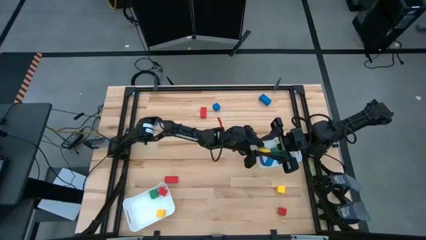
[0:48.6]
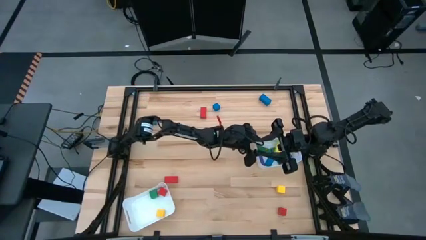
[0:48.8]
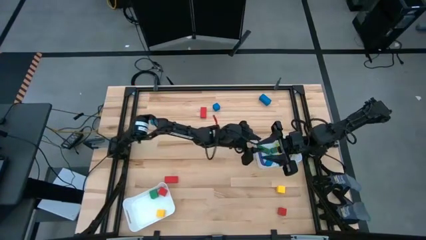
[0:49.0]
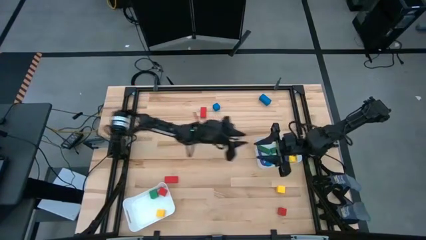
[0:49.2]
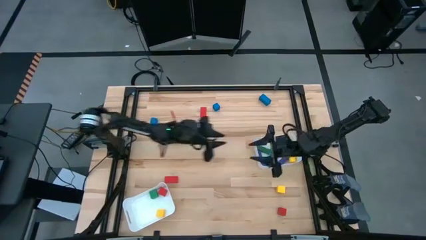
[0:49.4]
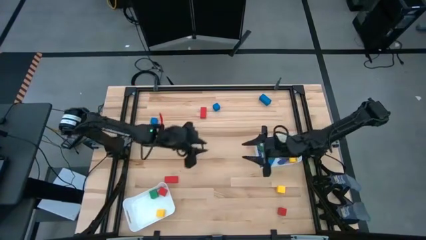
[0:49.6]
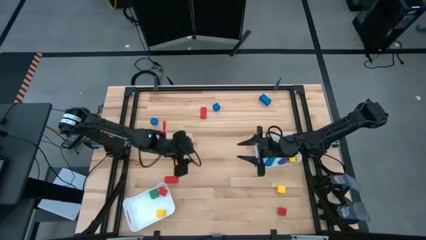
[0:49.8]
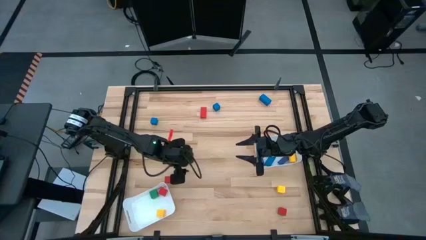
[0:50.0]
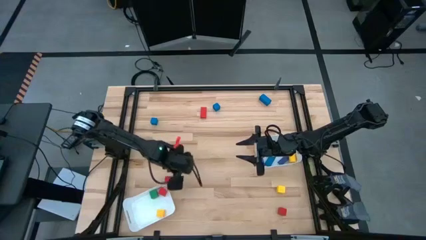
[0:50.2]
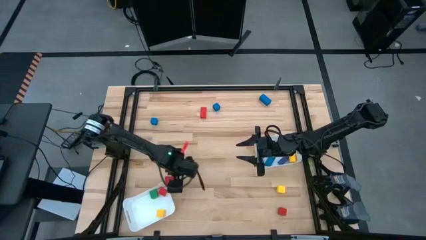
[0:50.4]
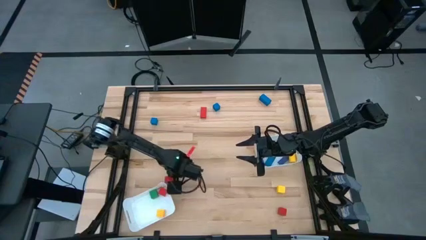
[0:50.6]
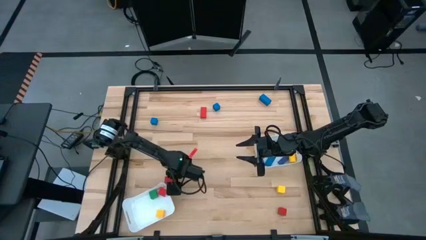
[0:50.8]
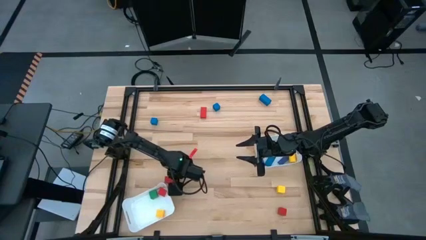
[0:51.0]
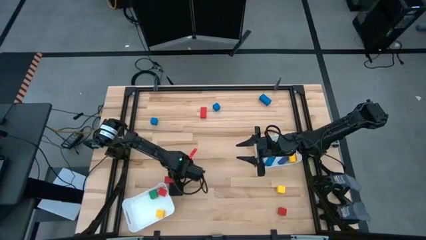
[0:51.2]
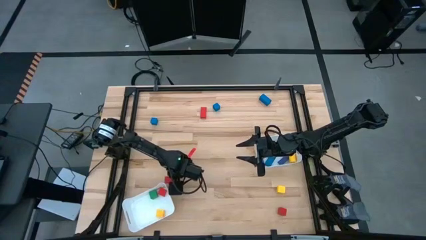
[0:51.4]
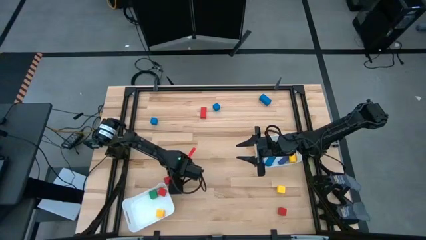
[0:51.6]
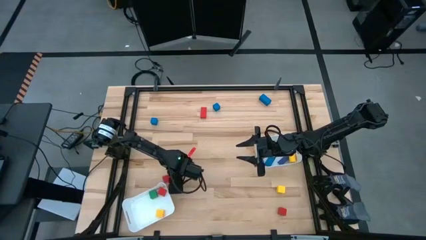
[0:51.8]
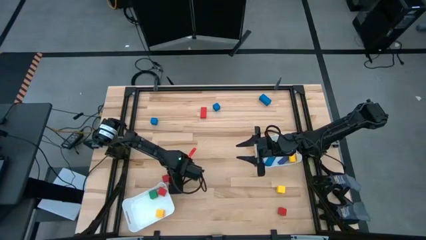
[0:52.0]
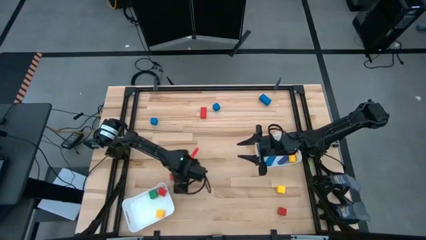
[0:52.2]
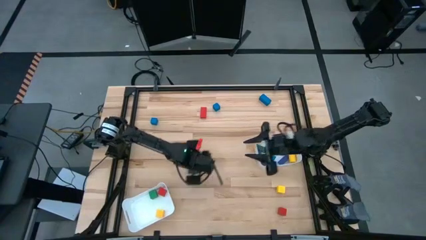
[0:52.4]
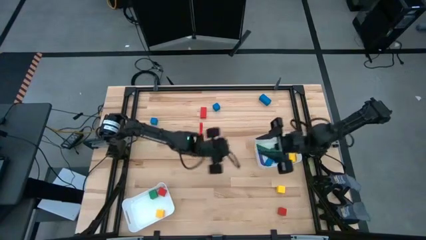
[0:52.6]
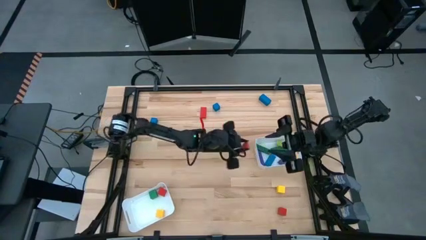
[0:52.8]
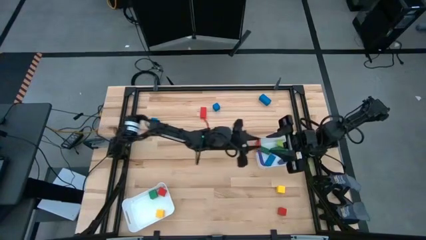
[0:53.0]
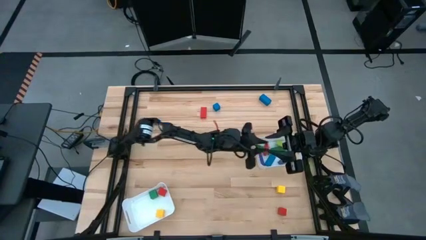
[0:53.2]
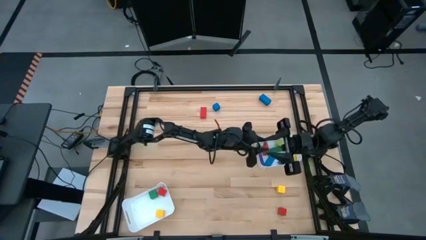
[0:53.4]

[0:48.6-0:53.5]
Task: Sort blocks by size
Put the red rectangular block into the top white bin

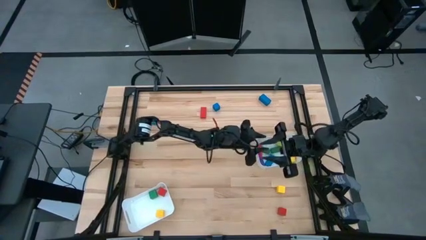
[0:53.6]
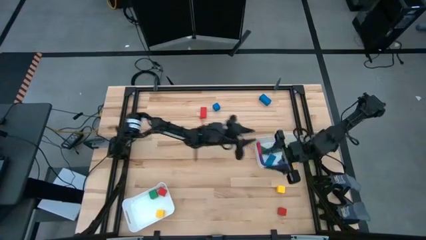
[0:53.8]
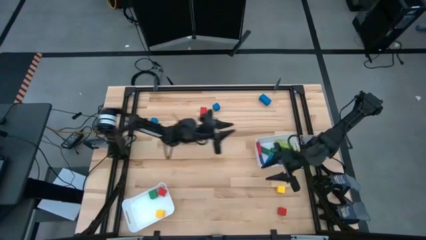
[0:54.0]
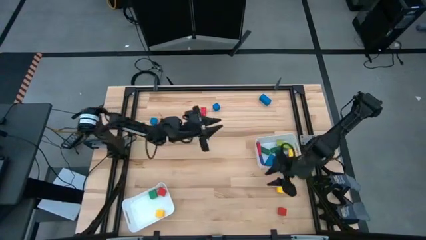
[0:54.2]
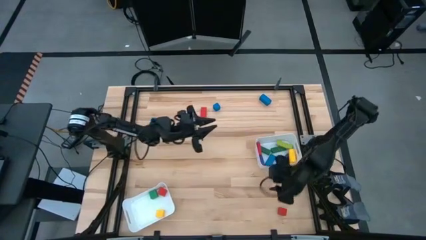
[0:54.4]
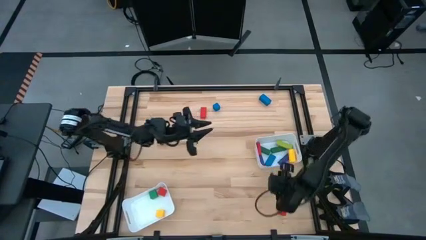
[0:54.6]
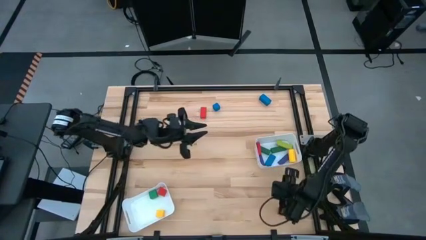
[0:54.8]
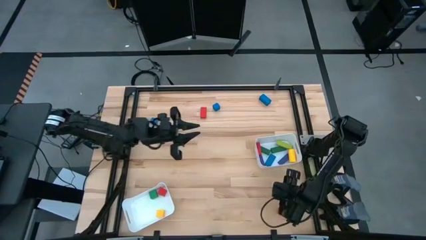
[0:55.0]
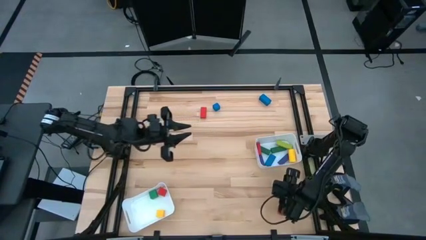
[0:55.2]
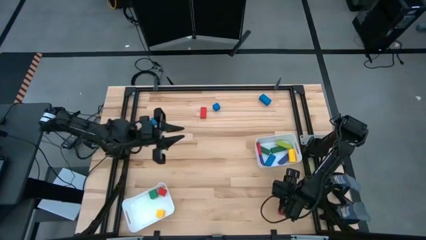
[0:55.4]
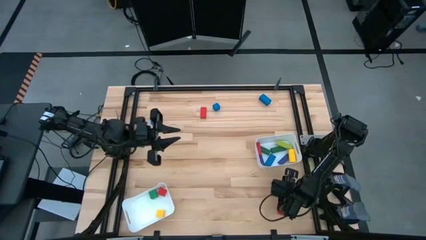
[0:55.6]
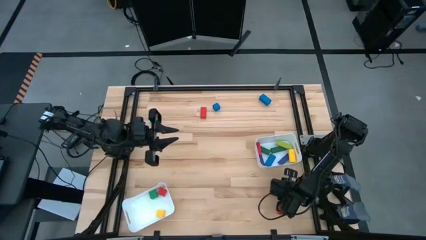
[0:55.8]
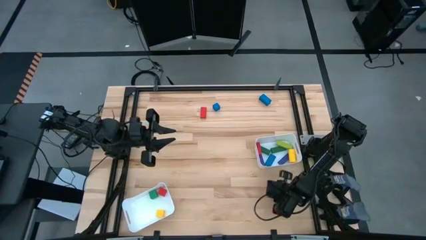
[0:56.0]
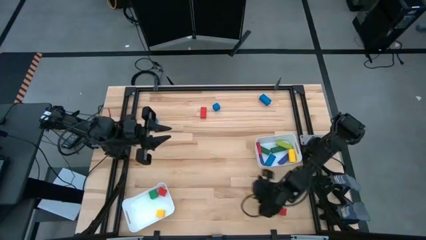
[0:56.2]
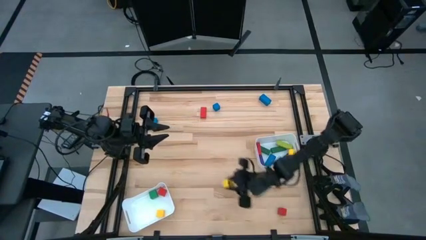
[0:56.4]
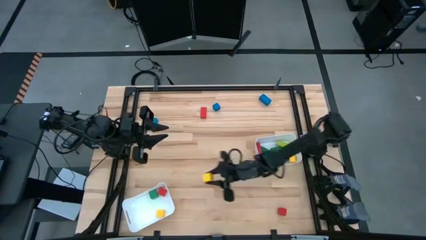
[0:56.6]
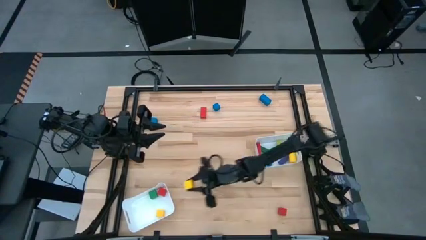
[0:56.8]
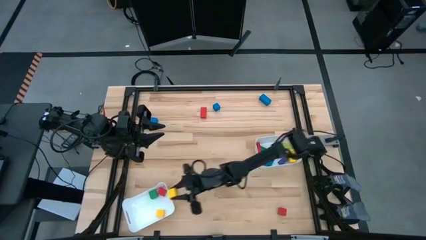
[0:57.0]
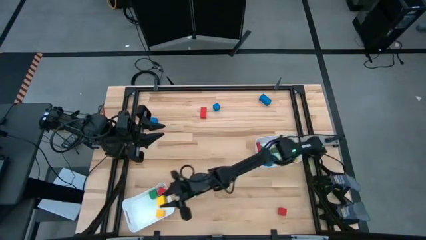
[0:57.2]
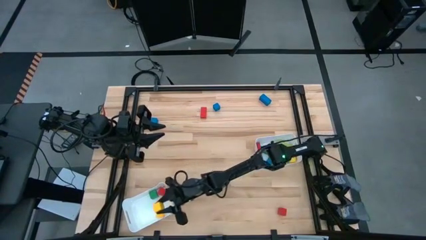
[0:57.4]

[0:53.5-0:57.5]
Put the yellow square block into the bottom white bin

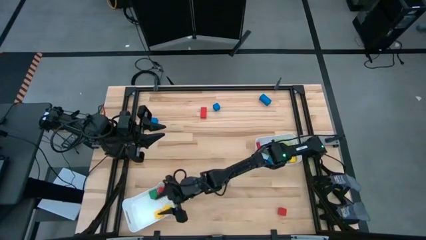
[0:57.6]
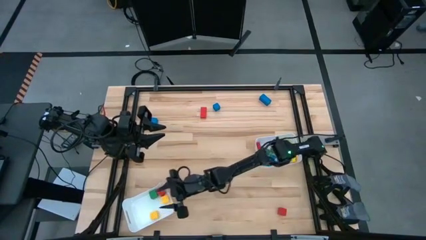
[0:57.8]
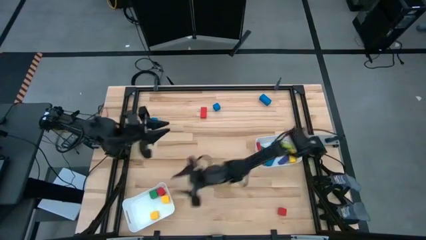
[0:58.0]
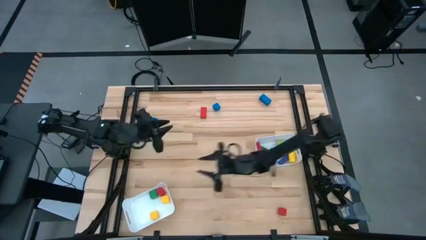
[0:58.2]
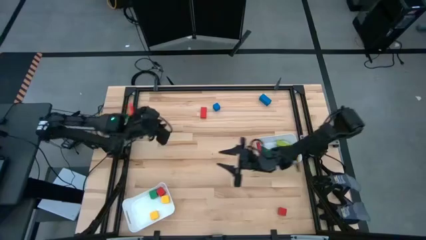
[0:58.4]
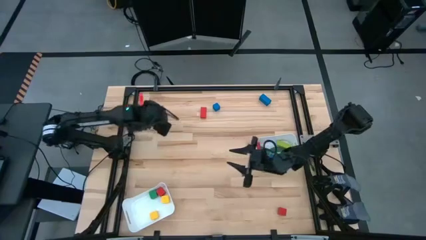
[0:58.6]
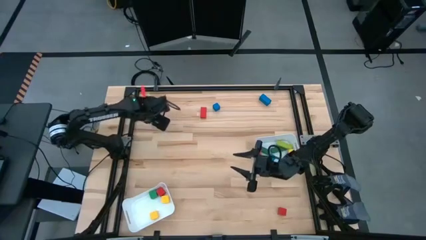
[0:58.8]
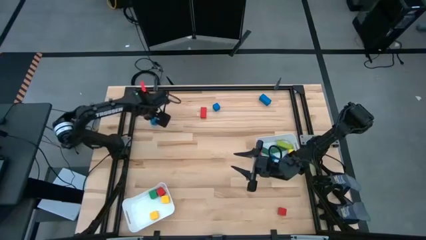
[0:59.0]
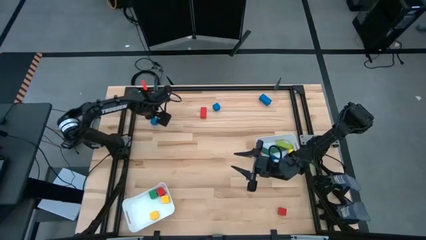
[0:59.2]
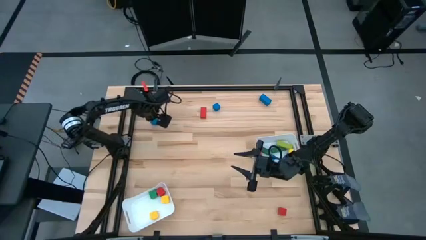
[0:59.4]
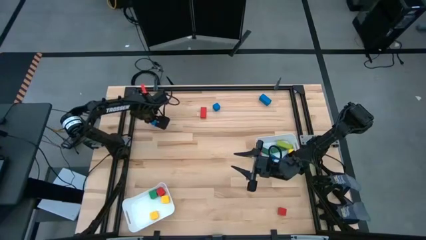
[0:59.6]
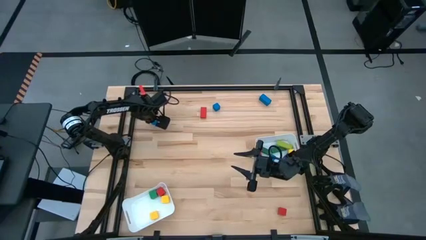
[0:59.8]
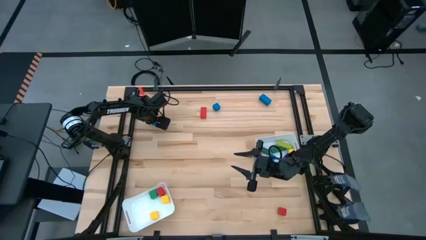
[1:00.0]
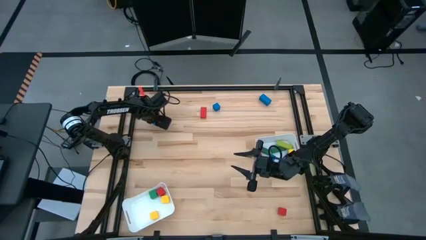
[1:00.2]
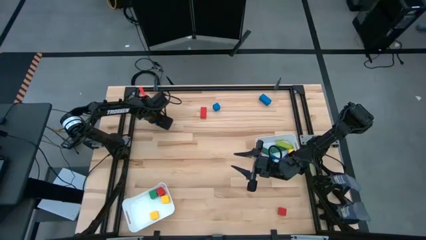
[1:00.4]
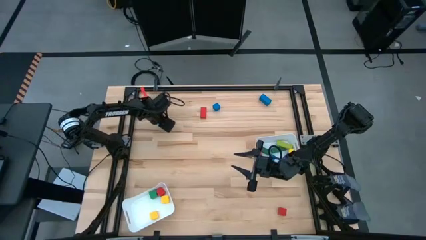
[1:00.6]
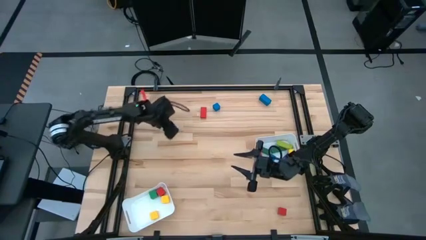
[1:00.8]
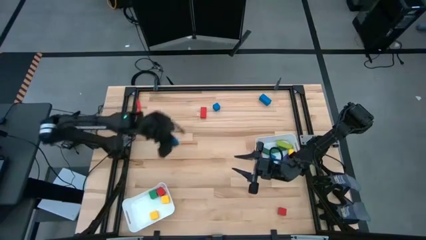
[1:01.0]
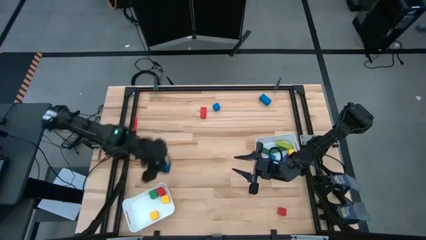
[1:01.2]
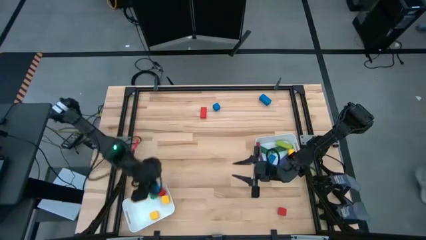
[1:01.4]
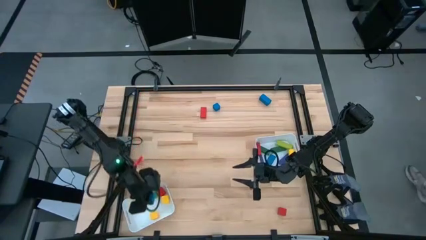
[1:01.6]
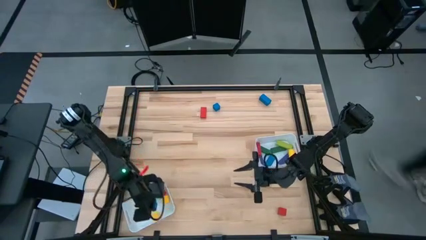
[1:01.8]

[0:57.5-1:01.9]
Put the blue square block into the bottom white bin

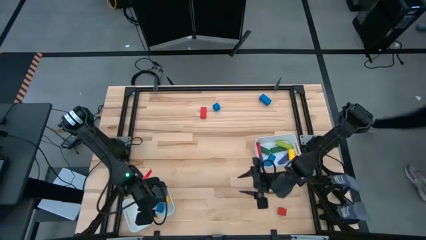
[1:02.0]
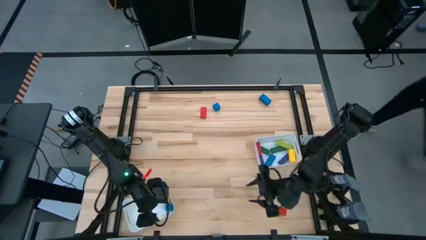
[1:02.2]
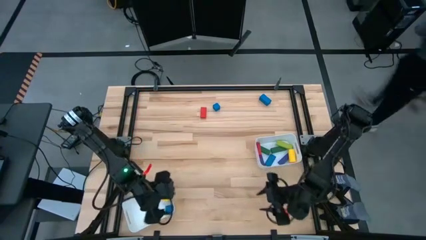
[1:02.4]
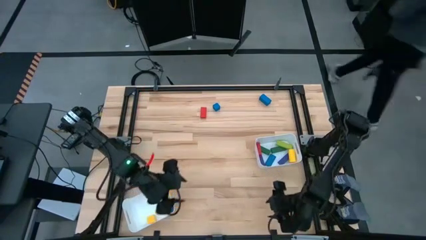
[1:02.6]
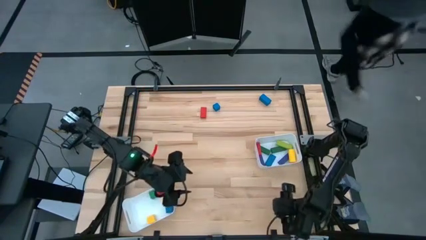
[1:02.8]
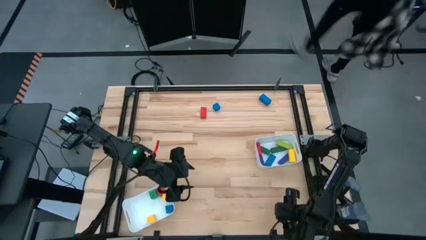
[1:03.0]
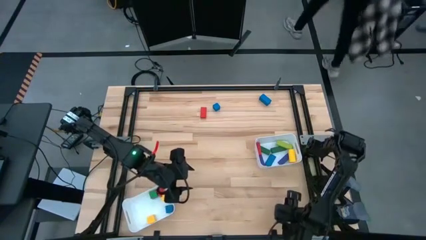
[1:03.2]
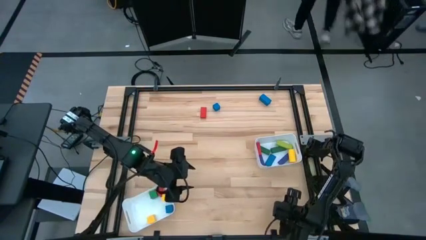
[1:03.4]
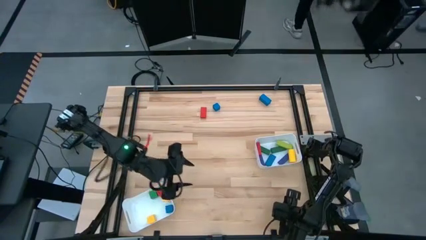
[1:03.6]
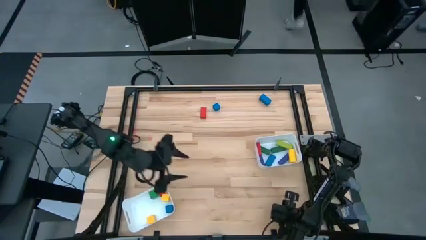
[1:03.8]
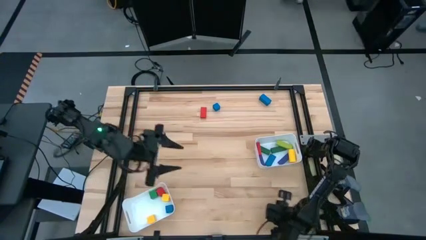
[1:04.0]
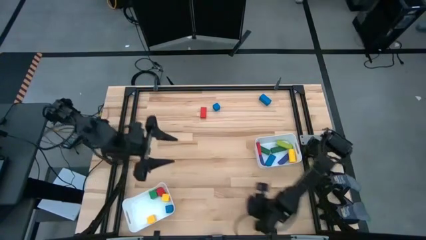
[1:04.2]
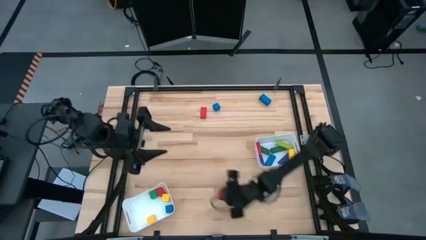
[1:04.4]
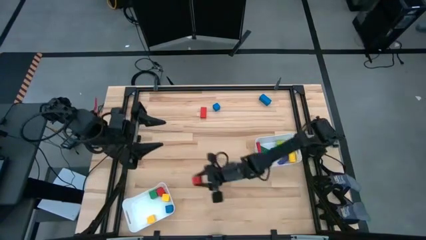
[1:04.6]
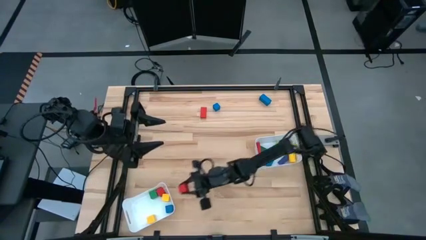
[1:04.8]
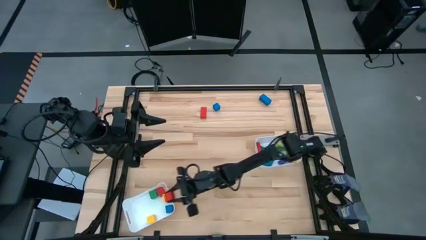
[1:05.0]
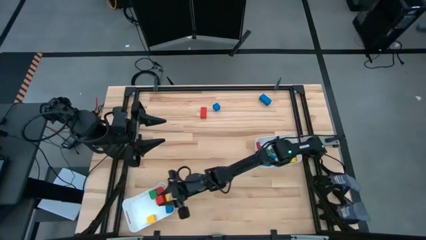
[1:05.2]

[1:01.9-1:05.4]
Put the red square block into the bottom white bin
